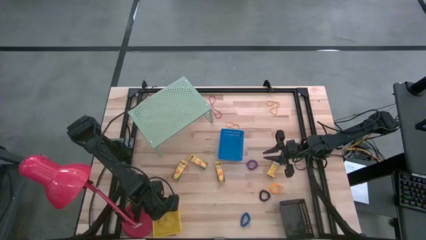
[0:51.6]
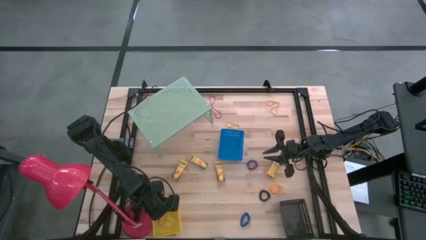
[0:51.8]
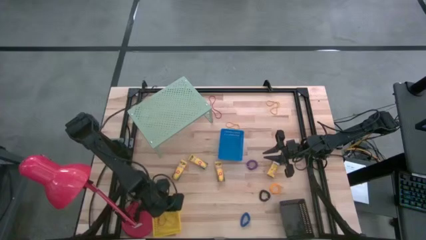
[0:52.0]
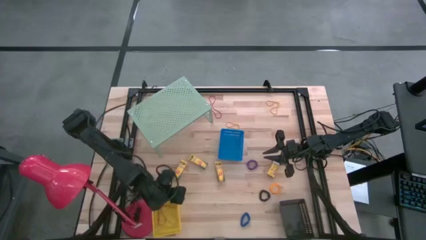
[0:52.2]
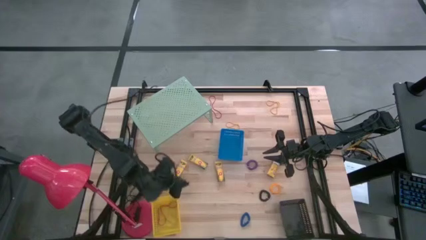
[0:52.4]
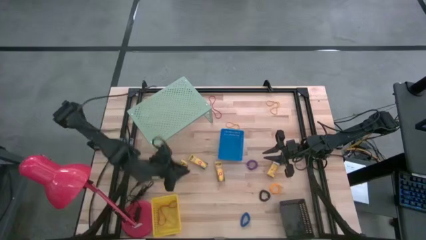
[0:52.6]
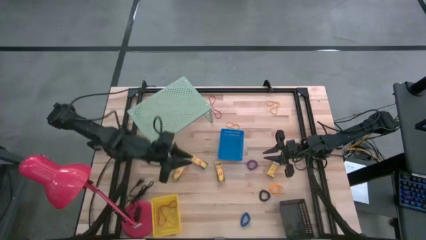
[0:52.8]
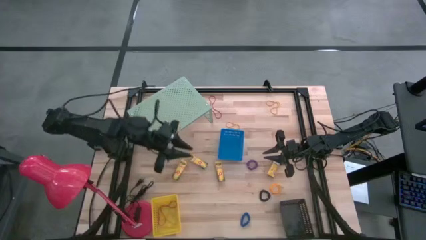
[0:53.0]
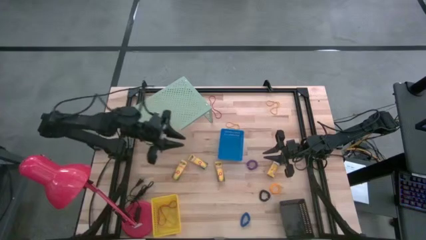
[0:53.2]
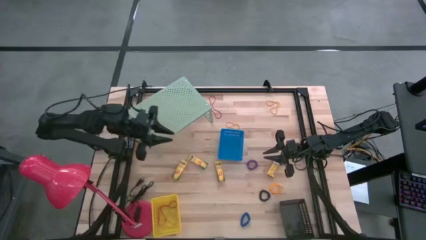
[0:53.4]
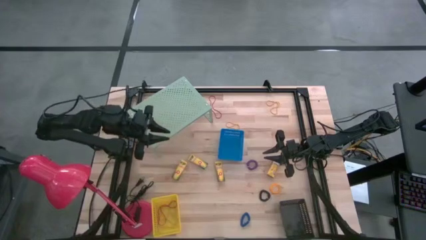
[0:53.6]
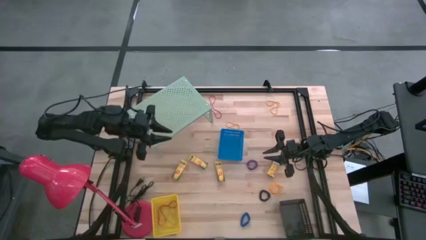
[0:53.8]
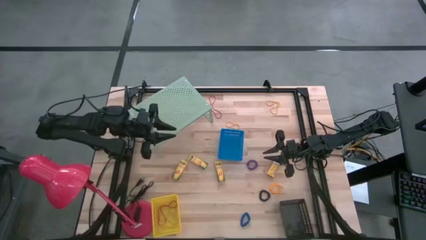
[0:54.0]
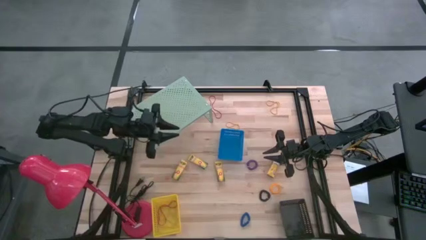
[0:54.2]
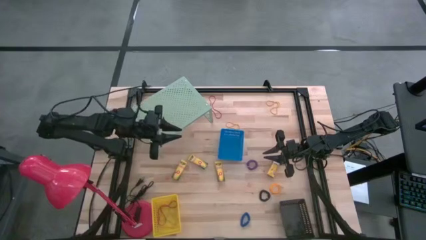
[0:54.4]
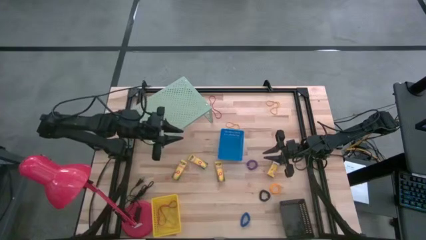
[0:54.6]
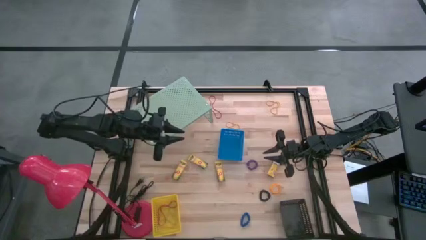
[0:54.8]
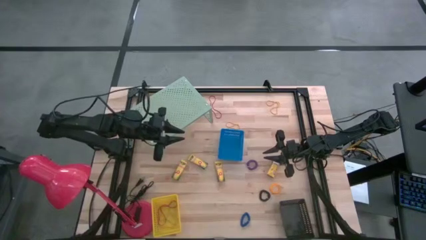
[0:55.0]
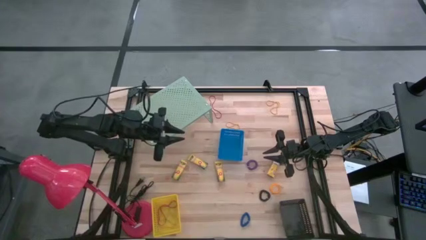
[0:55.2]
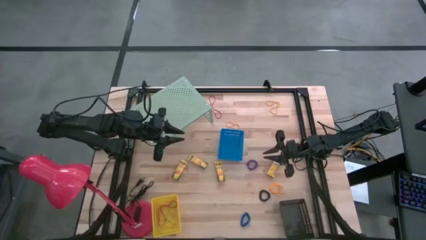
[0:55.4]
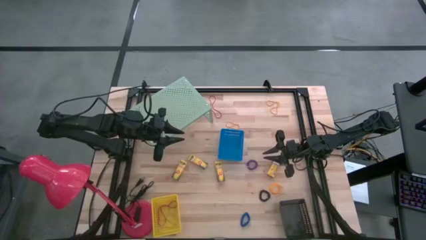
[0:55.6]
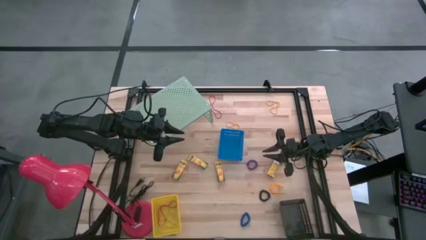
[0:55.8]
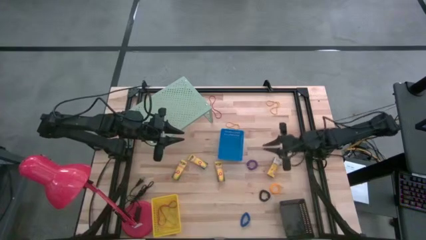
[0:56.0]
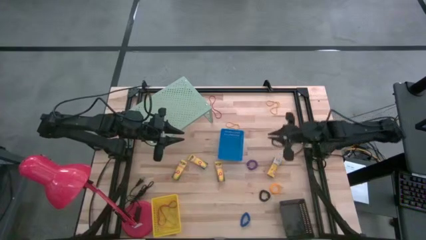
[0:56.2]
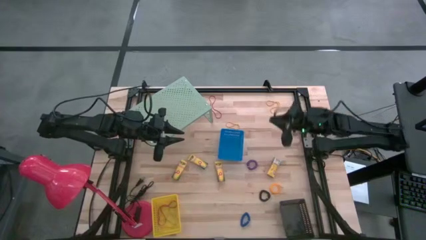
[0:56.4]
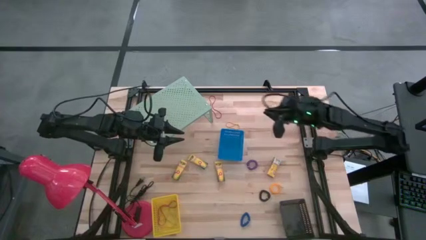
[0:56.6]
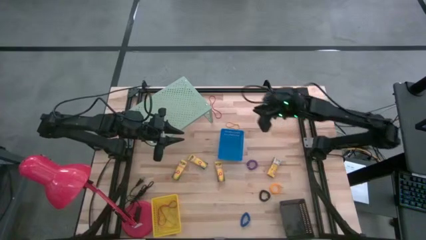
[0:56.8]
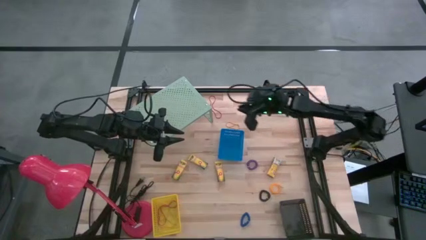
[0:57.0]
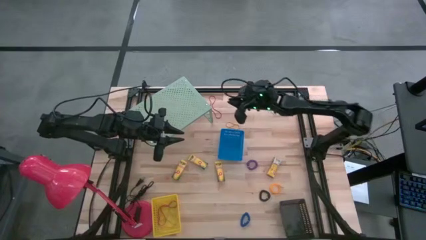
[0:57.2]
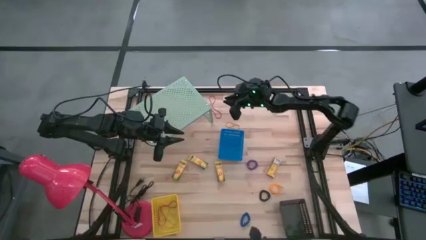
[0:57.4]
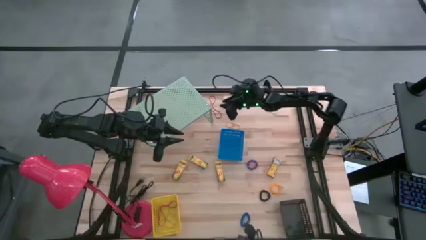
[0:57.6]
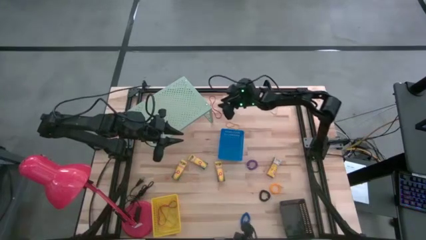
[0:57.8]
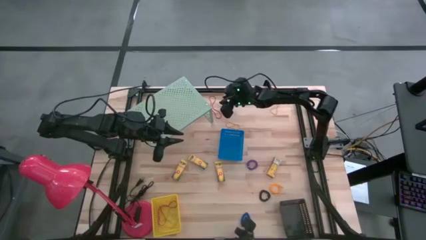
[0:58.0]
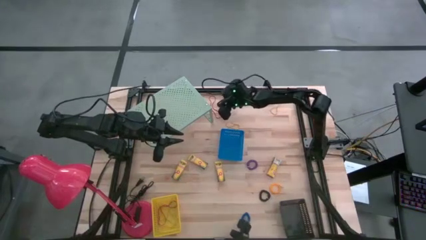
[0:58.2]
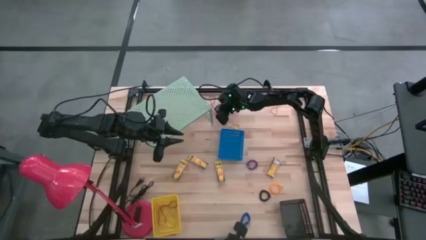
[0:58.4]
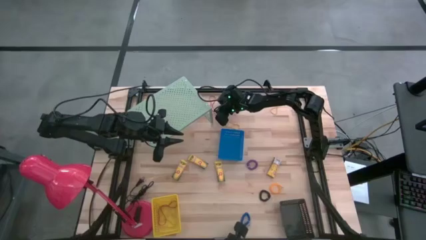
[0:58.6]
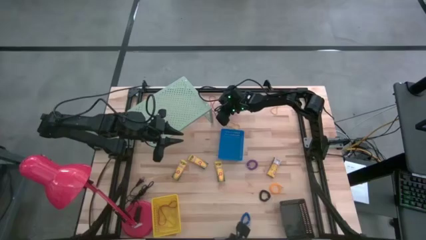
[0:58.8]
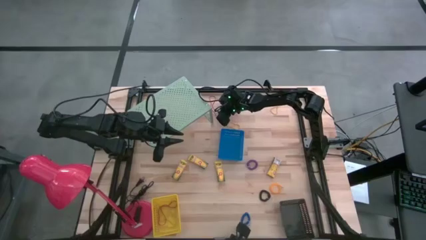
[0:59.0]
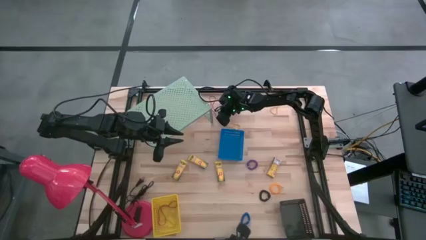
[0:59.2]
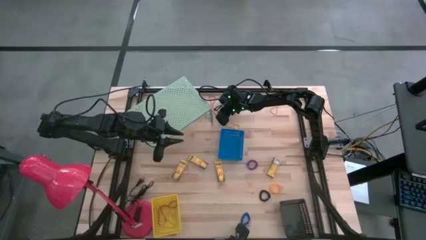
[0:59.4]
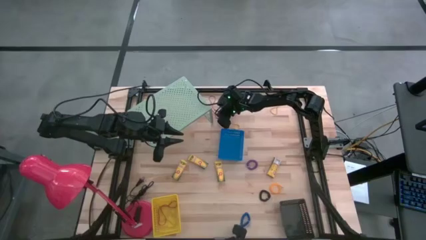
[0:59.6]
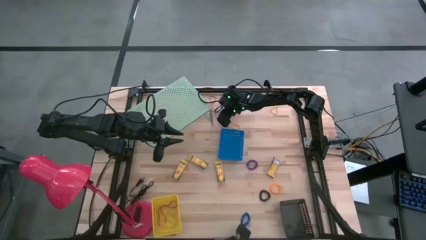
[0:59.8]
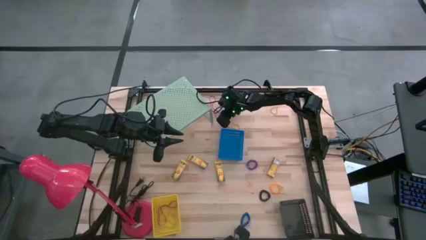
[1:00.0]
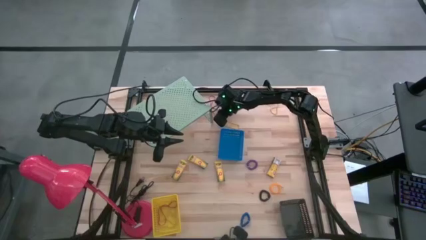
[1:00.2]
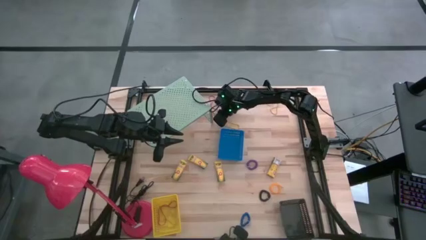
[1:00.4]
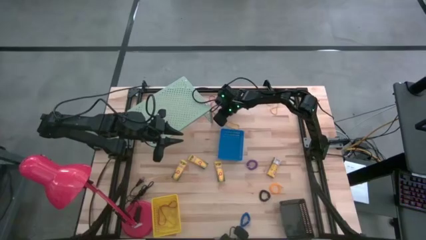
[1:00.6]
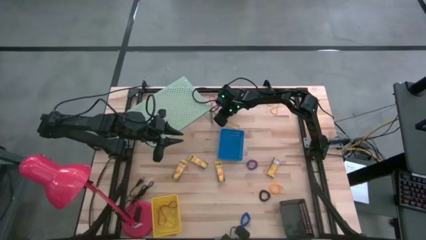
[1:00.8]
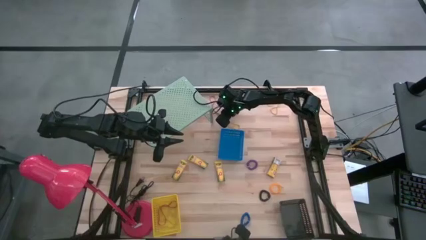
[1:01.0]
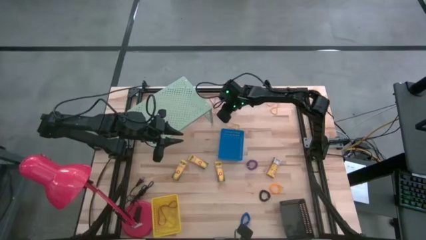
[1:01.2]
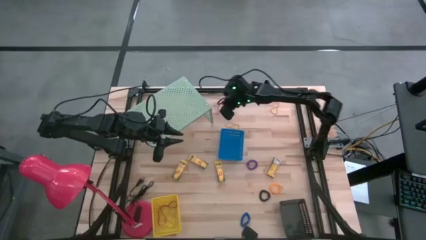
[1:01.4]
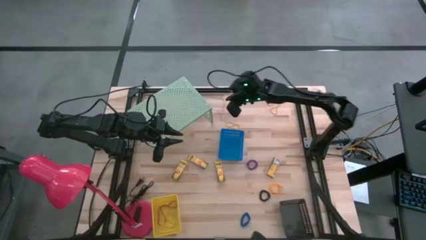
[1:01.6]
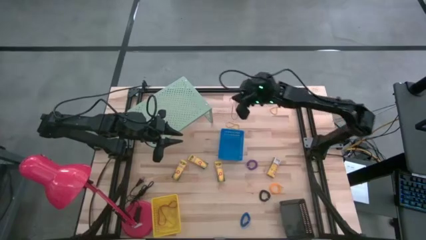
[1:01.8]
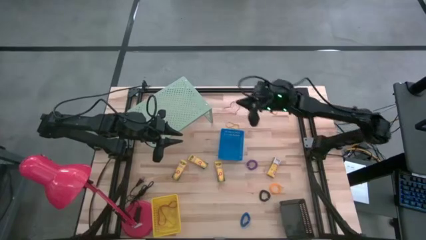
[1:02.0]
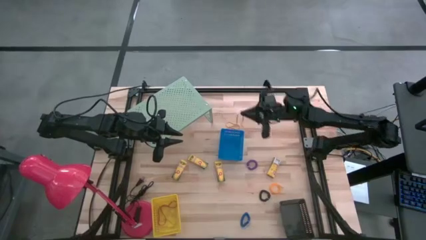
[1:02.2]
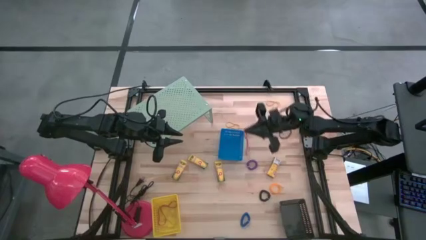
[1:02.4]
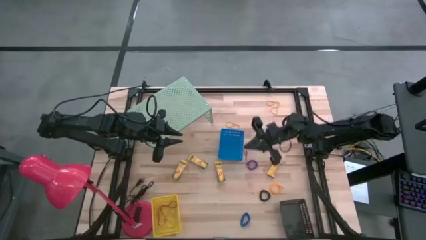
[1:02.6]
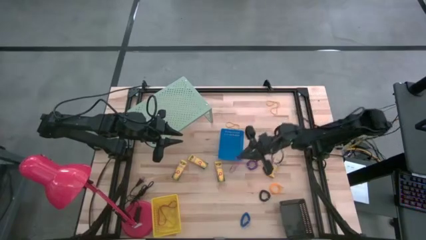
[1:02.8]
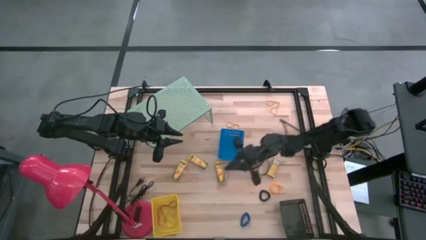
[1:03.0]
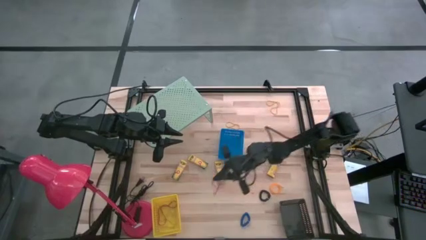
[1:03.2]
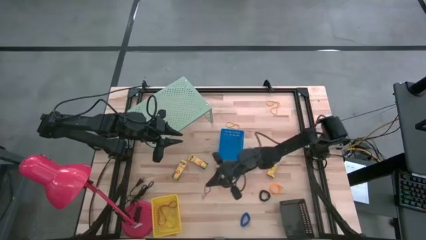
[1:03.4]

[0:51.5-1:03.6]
Task: Pick & Place Office Desk Supplies
Put the bottom red rubber band into the yellow basket

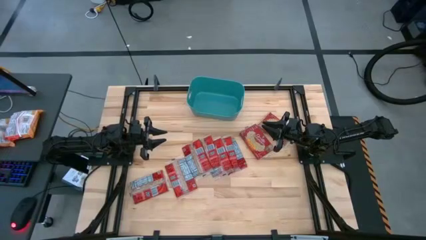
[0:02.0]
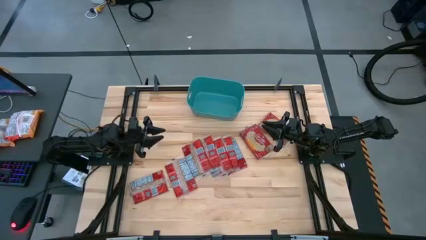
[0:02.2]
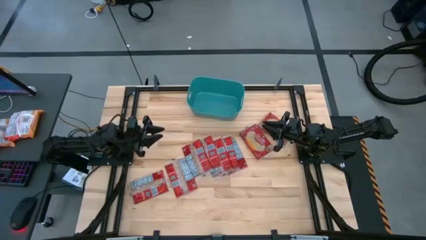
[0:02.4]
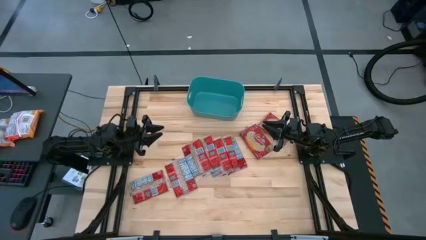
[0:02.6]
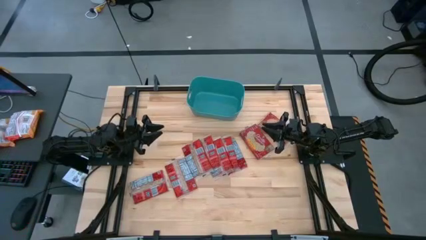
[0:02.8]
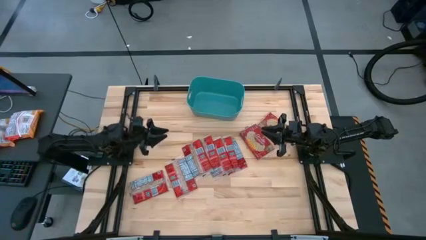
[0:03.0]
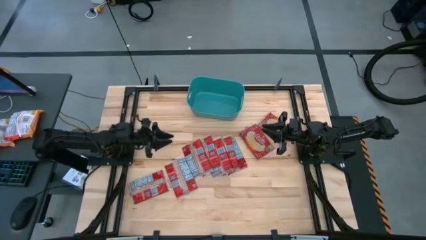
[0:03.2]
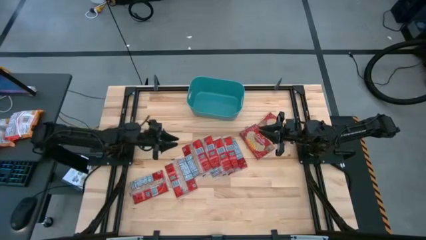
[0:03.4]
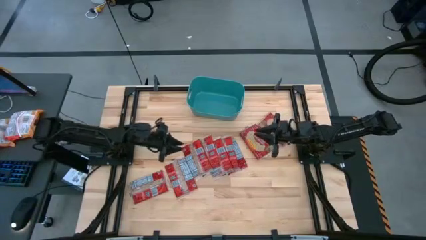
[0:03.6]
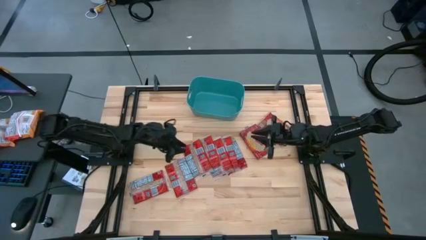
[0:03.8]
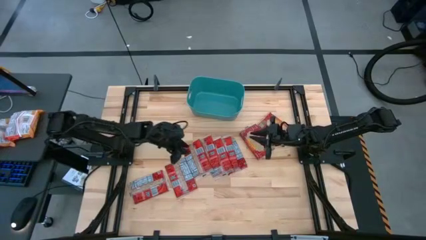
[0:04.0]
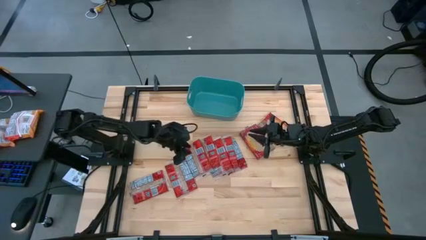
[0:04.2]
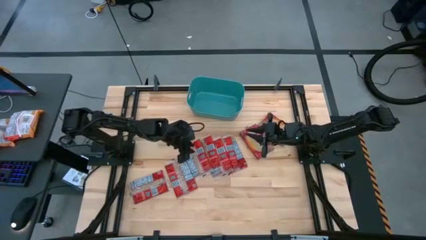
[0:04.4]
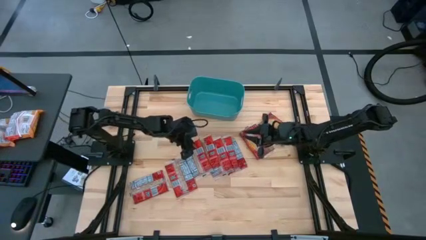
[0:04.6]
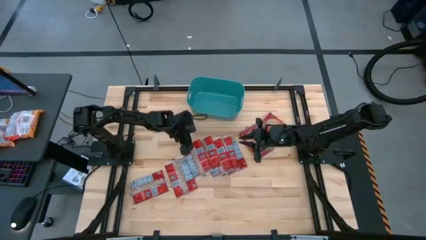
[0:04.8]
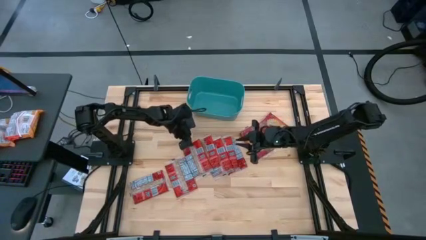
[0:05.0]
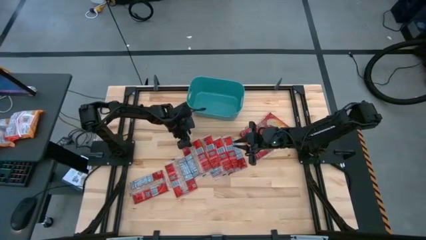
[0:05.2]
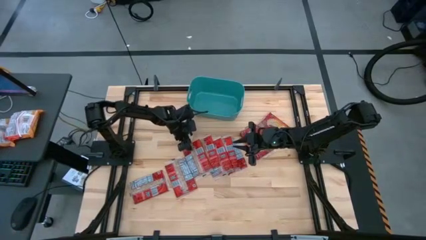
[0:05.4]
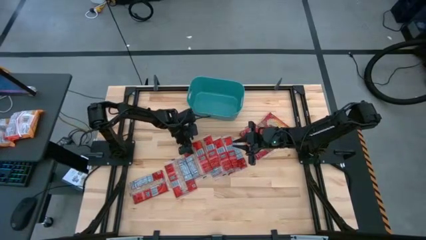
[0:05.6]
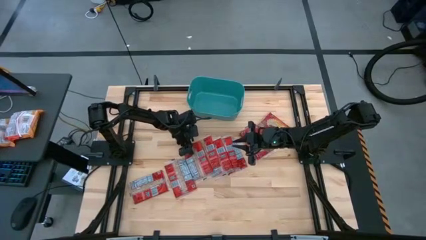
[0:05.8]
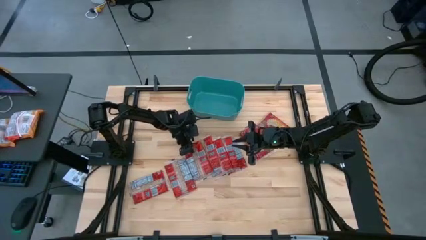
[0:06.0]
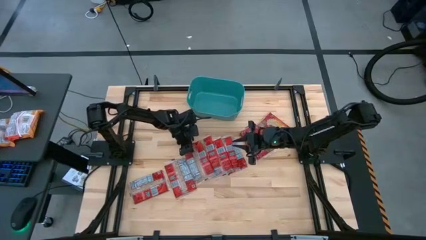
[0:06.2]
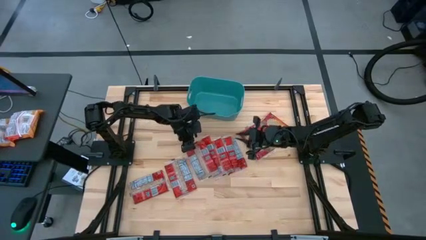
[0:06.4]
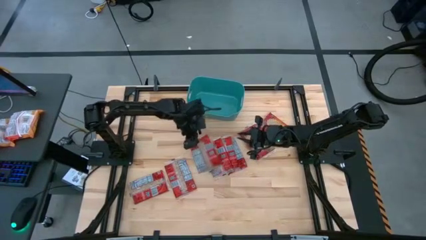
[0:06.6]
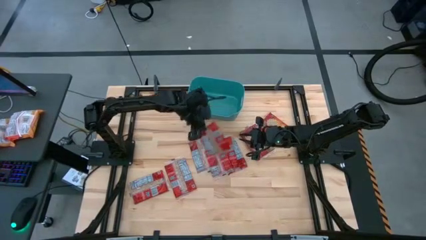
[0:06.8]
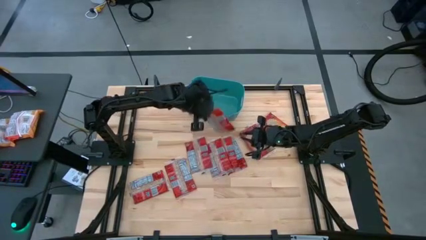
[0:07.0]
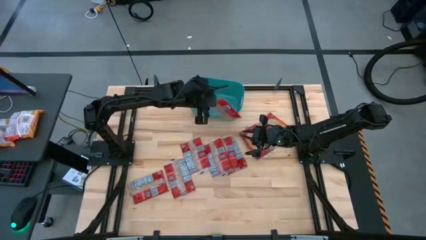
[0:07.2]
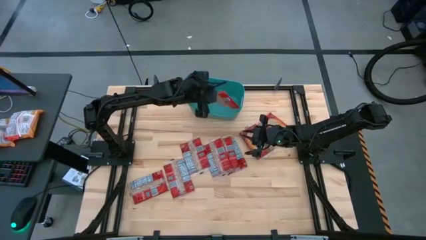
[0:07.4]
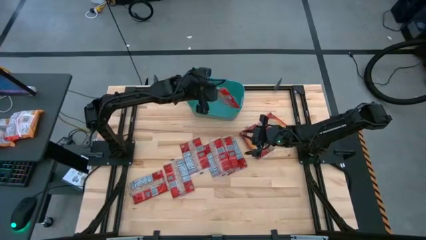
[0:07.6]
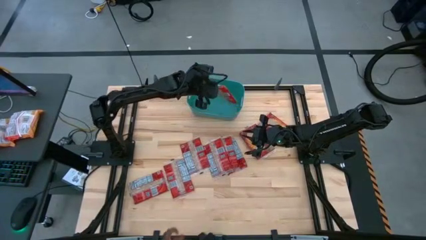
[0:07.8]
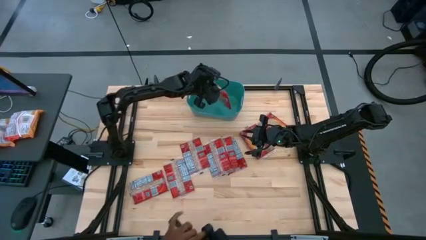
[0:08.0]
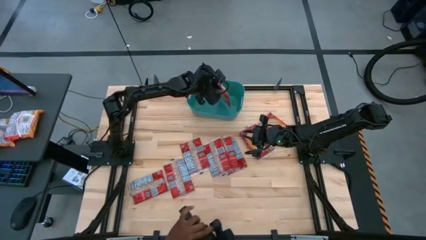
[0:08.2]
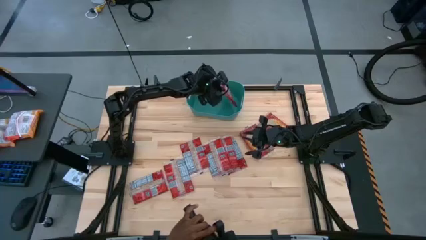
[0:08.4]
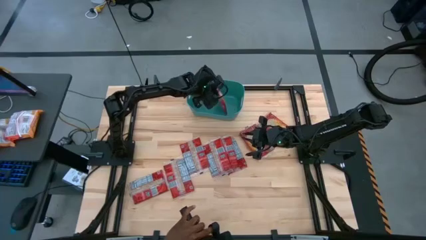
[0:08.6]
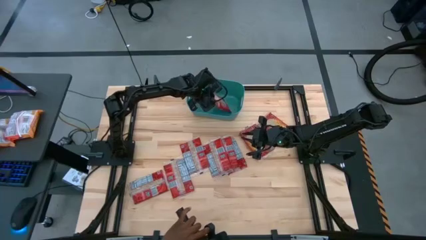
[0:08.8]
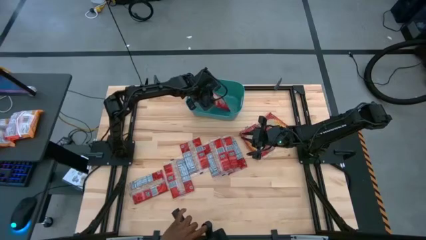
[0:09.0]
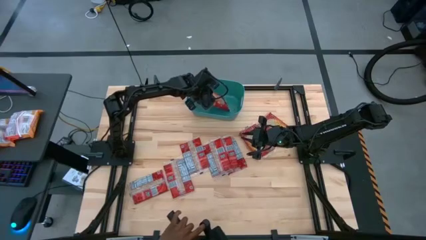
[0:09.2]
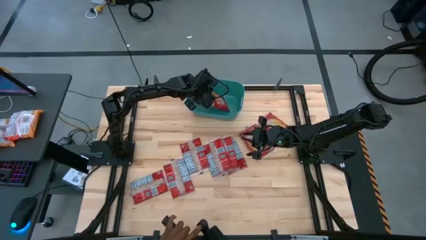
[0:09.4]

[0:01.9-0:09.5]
Task: Sort popcorn bags into baskets
Put the red popcorn bag into the green bin
